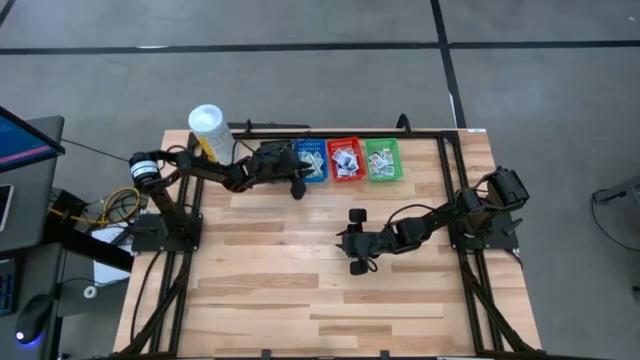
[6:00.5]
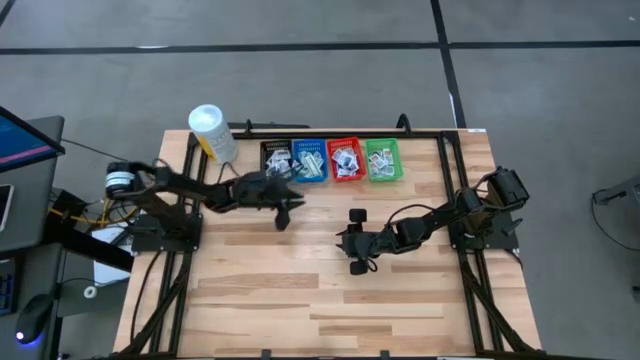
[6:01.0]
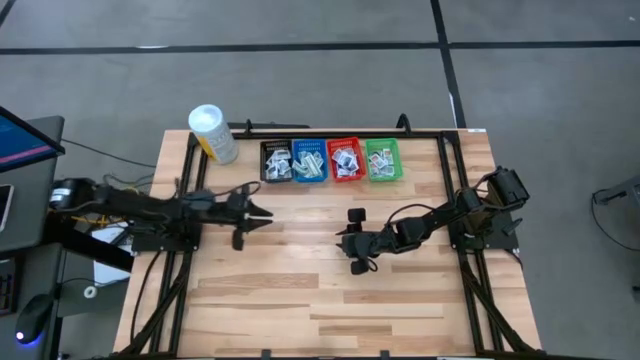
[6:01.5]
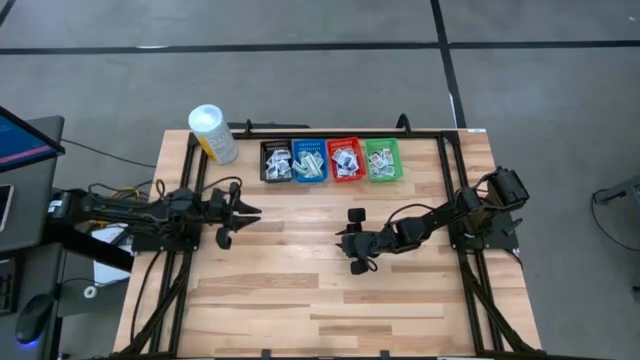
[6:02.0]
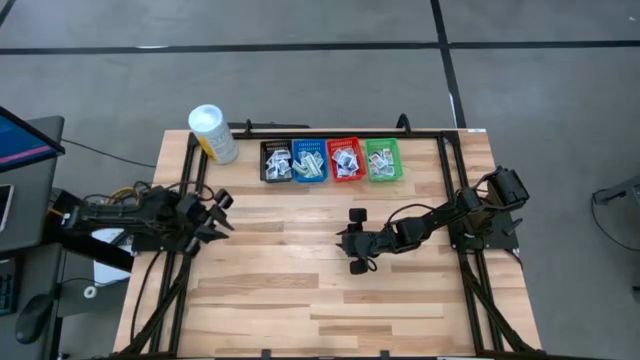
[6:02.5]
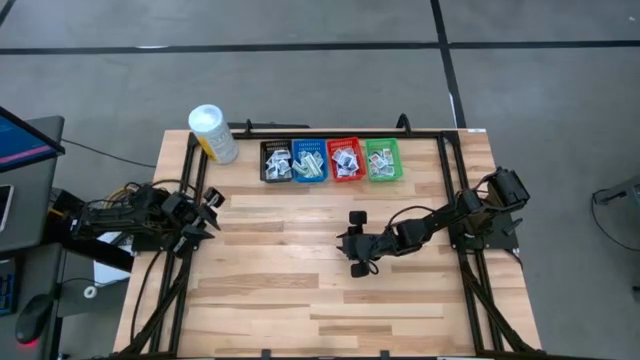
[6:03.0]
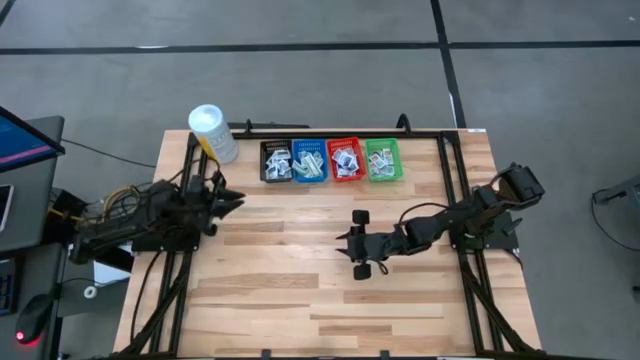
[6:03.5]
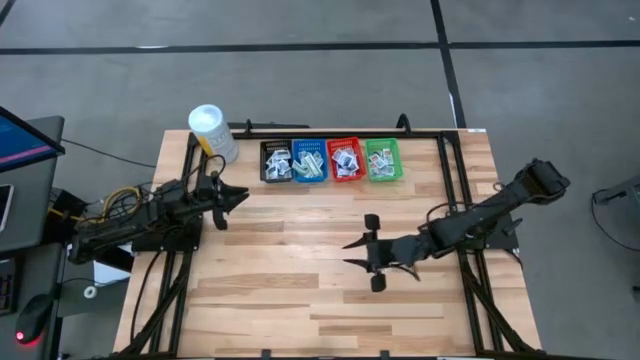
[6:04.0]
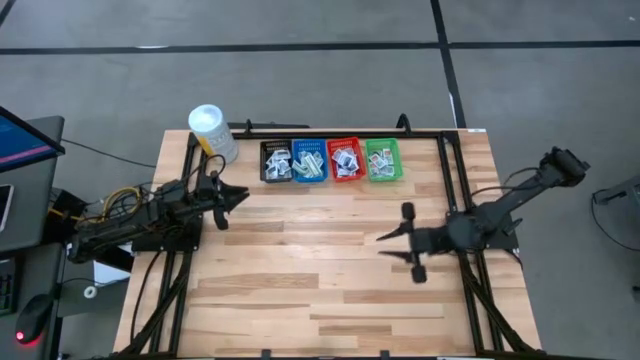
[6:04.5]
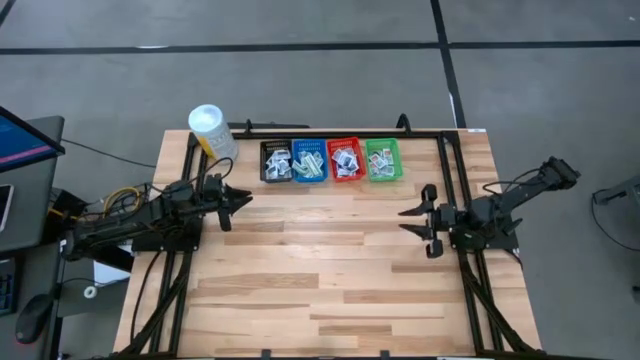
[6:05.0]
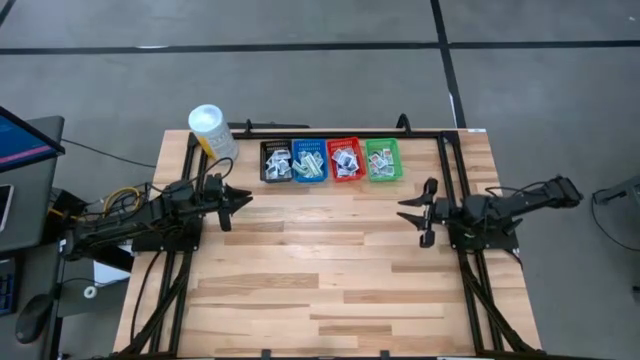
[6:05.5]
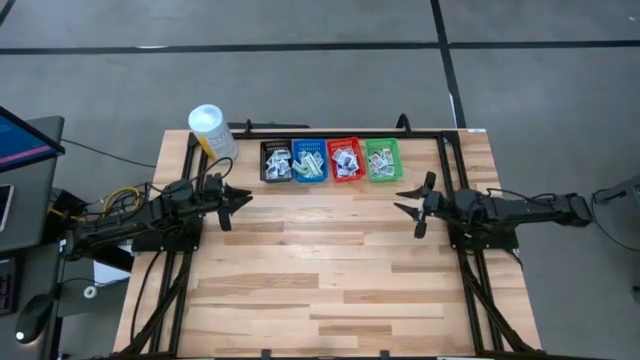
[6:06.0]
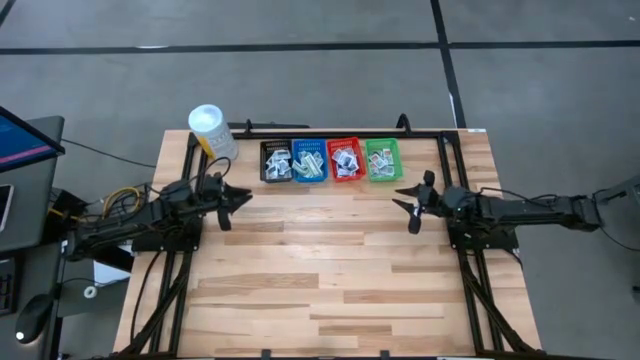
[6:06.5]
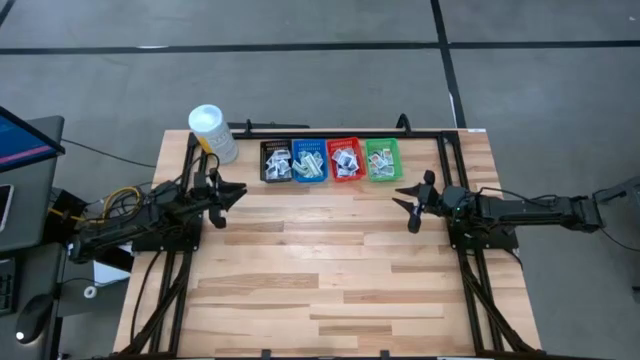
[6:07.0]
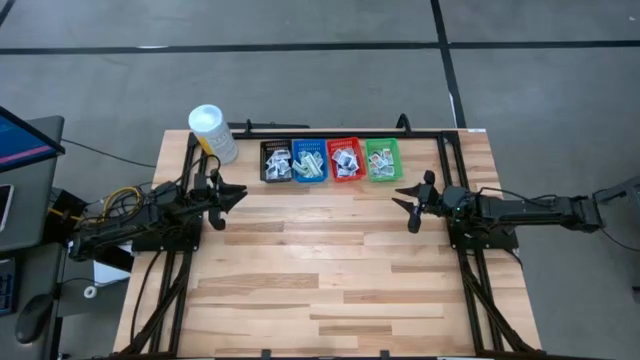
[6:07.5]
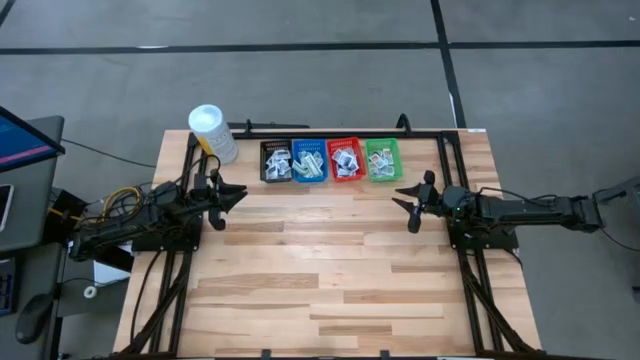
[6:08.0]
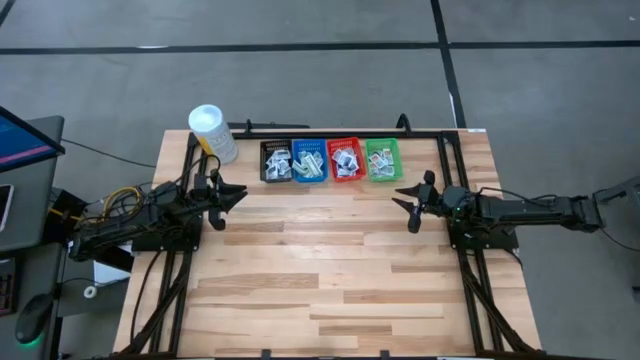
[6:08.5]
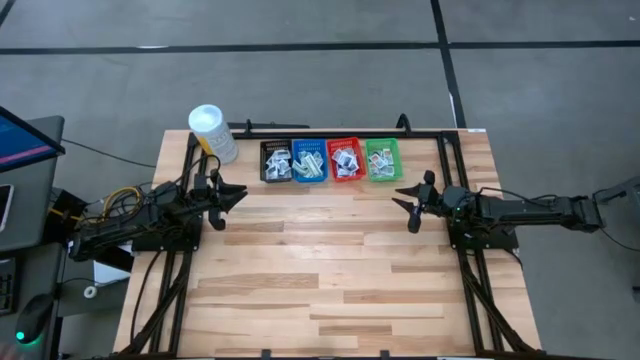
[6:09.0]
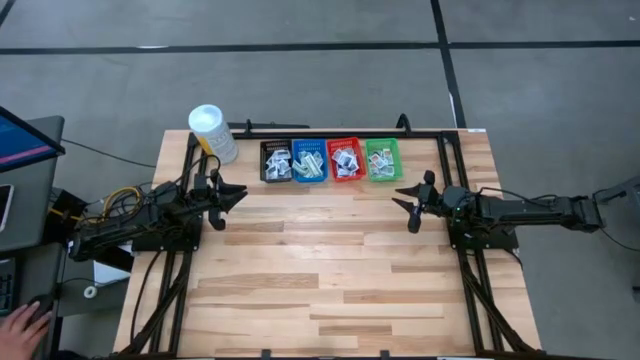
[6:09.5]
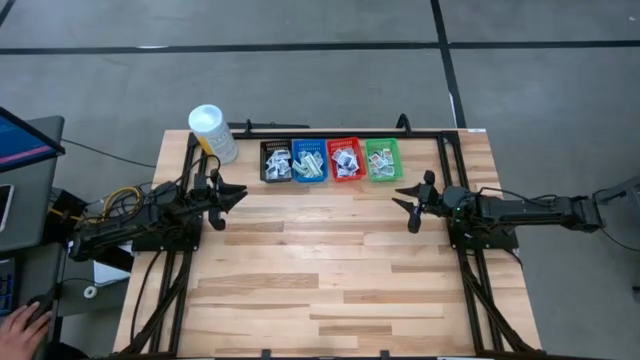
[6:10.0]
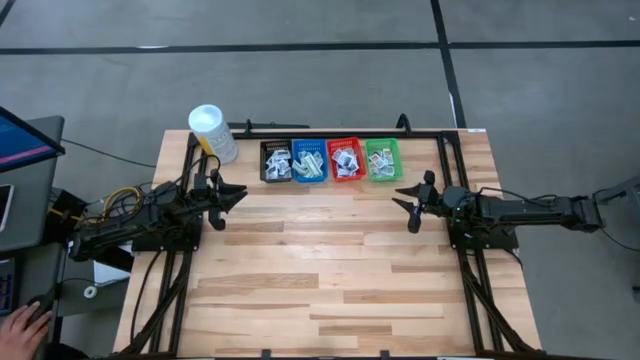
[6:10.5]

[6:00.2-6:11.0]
Task: Pick & Place First Aid Supplies
Return to Home Position
